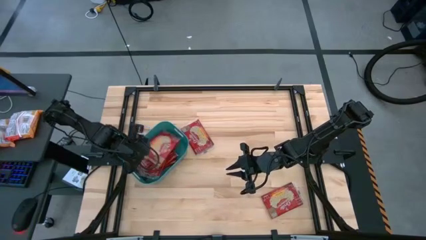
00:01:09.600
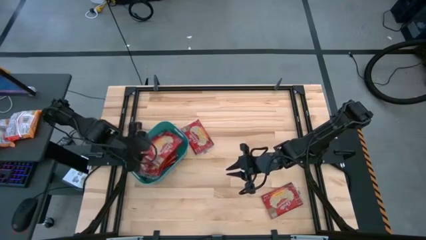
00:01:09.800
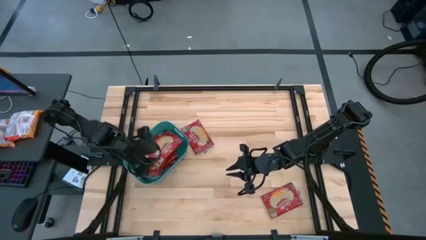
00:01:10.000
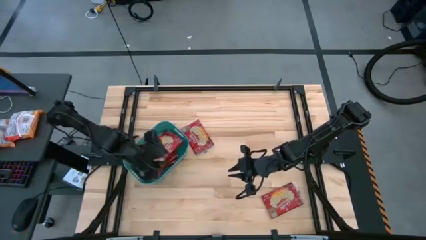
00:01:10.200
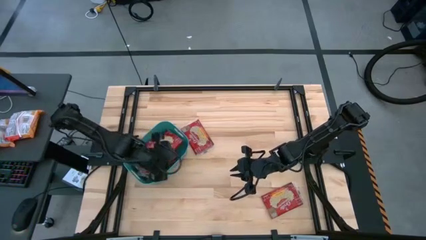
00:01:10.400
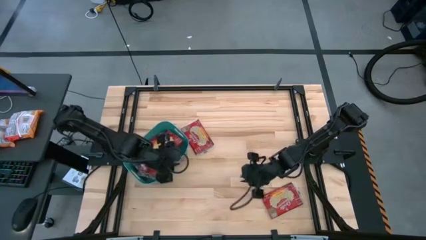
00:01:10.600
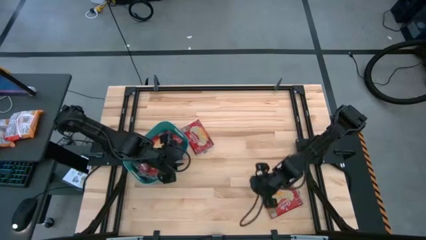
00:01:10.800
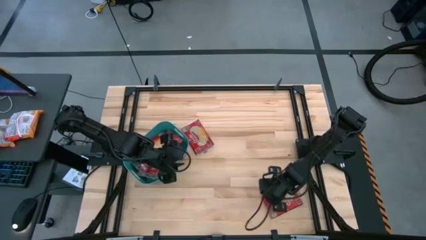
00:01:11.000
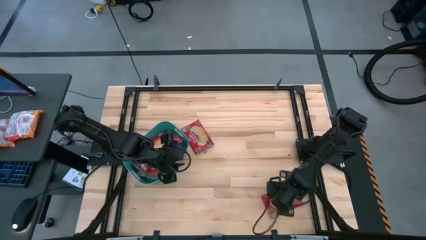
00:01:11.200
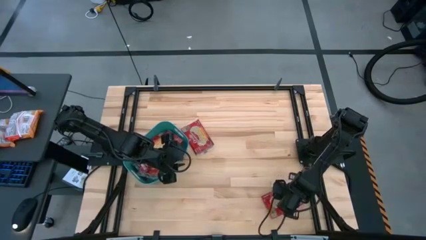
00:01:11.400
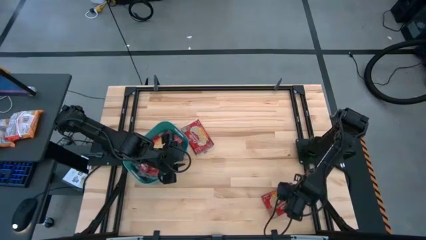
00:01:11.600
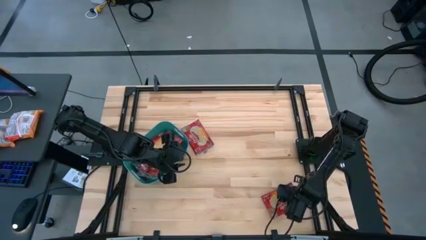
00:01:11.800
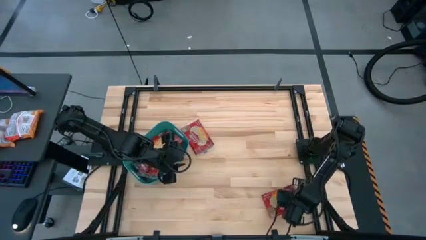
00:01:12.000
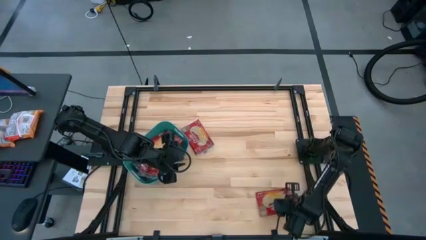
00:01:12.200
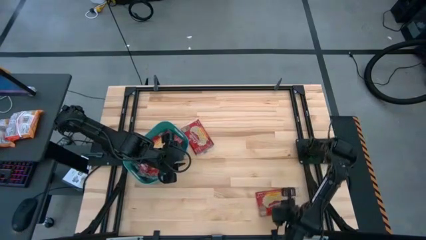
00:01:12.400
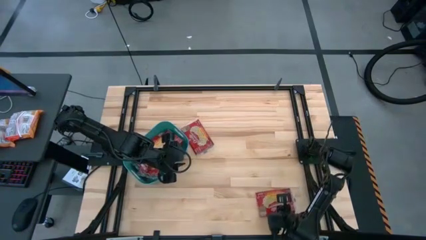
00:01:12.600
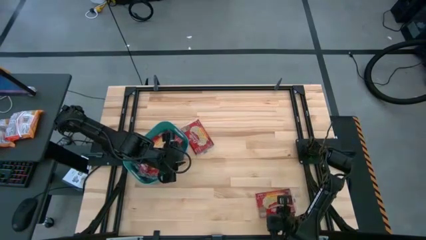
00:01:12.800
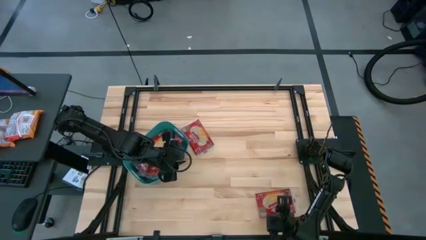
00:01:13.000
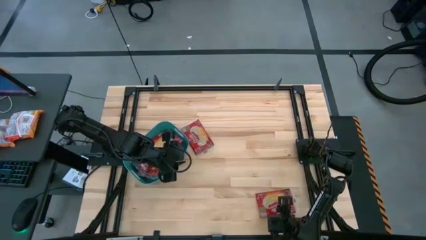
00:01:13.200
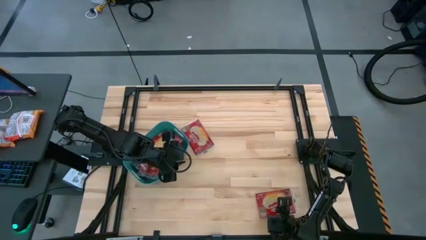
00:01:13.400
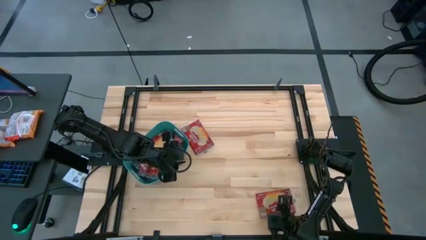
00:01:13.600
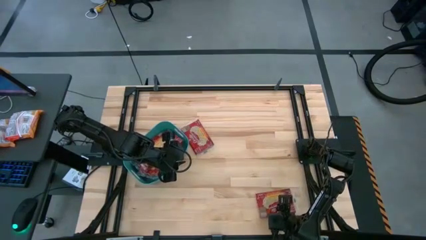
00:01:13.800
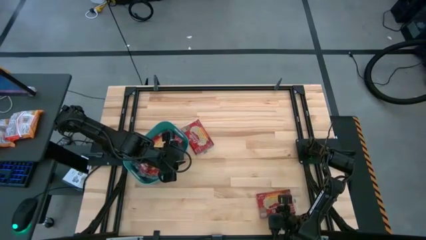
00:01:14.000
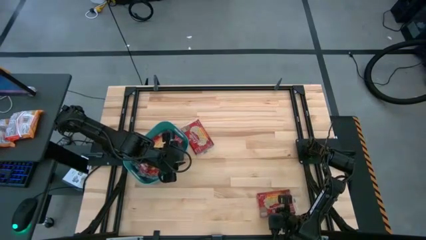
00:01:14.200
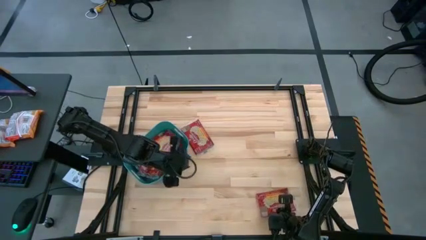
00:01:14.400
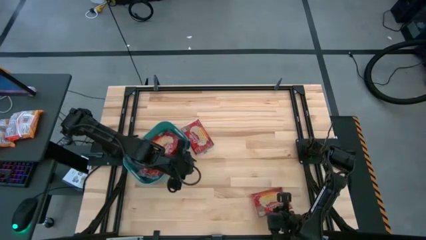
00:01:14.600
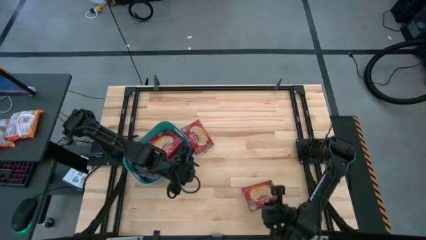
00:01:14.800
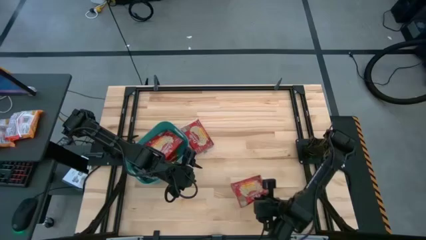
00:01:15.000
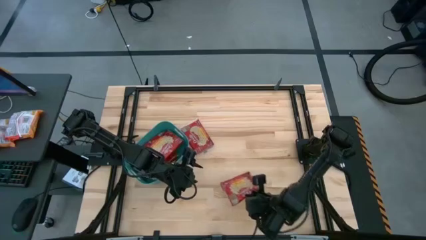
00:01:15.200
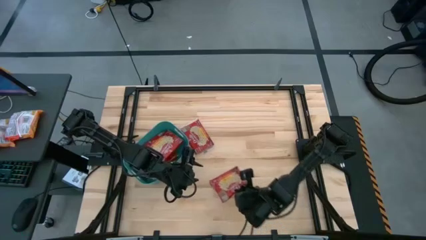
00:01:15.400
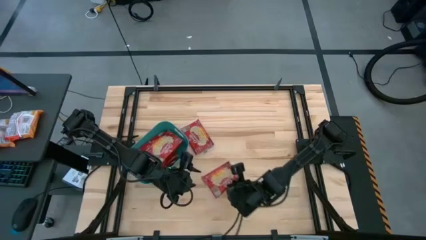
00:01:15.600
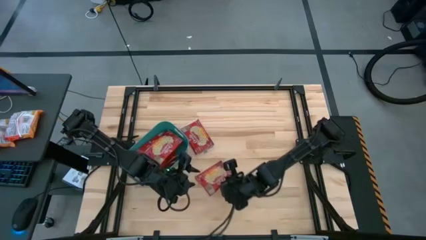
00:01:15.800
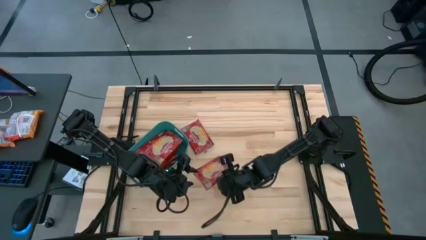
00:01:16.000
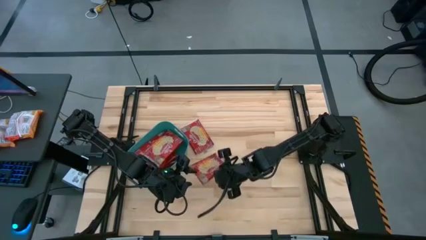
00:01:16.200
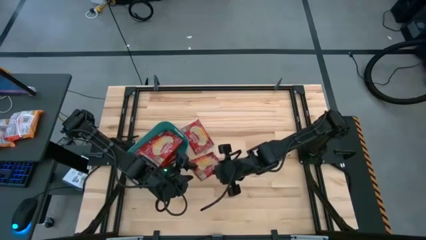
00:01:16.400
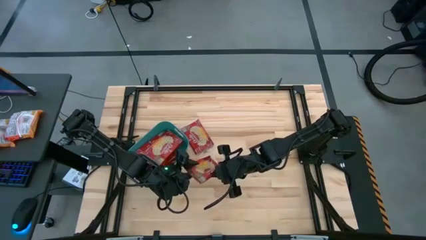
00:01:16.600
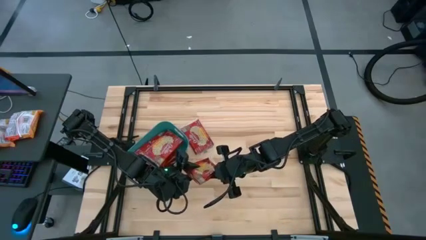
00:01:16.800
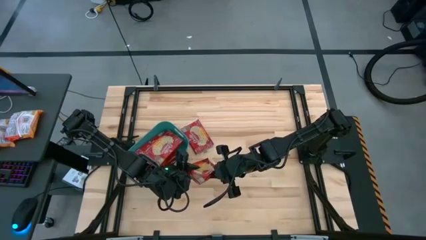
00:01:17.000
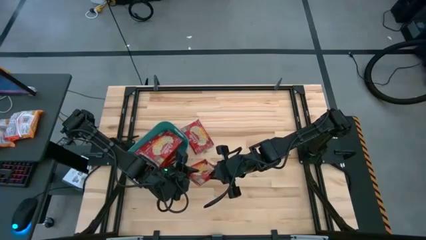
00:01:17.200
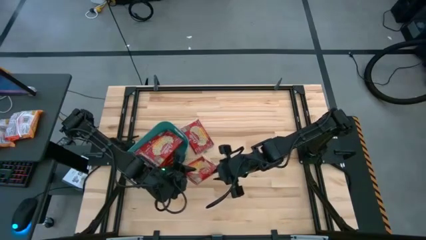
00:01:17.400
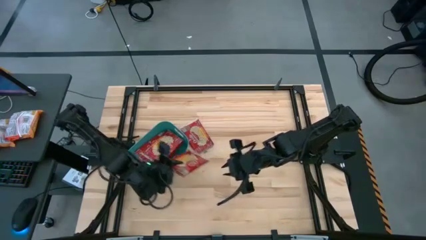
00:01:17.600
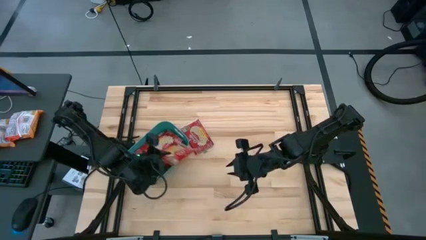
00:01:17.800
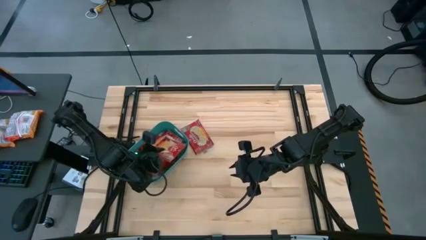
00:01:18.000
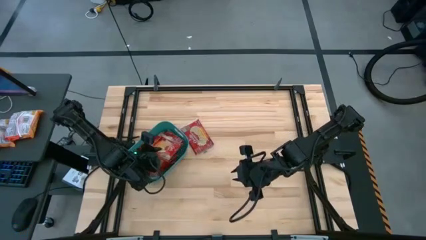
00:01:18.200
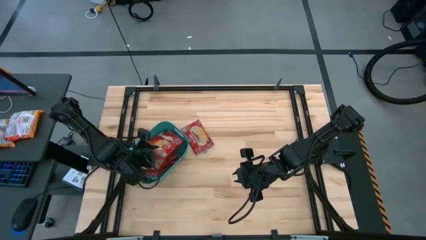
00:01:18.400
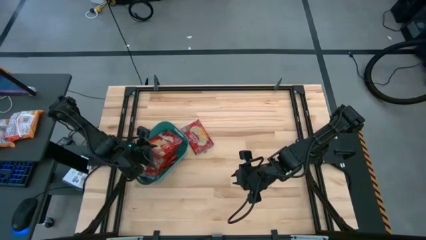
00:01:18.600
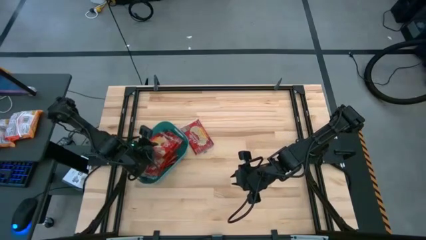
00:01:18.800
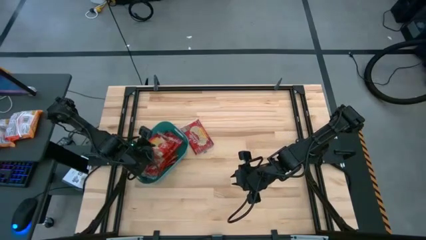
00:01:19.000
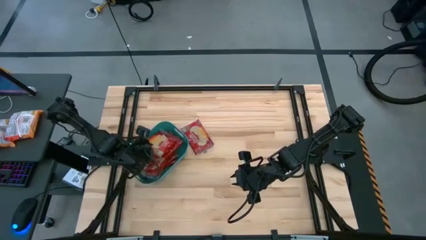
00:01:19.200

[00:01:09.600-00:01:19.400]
Task: Sort popcorn bags into baskets
Put the red popcorn bag into the green bin
